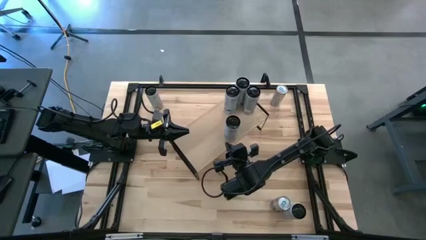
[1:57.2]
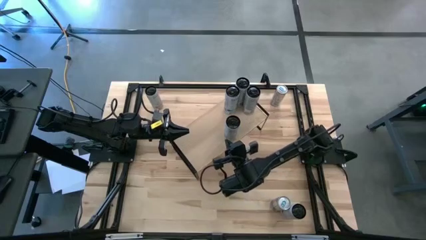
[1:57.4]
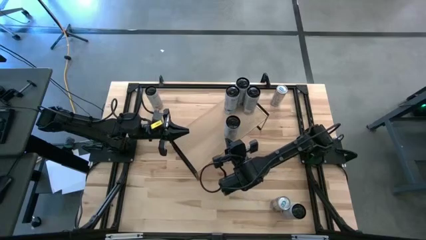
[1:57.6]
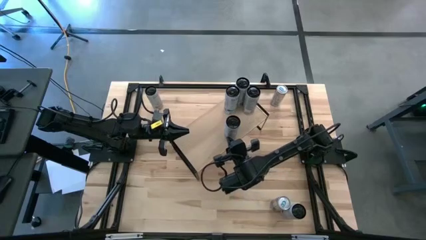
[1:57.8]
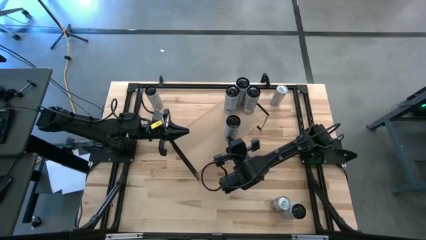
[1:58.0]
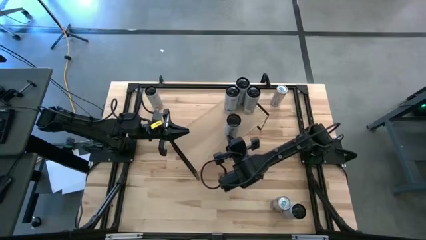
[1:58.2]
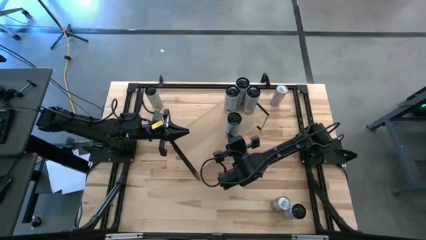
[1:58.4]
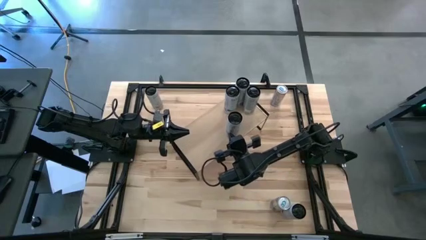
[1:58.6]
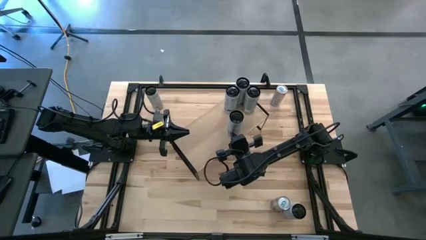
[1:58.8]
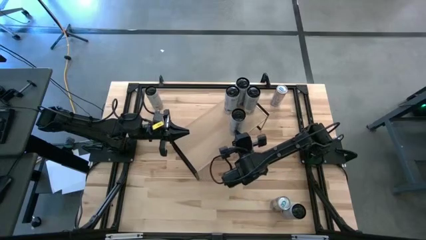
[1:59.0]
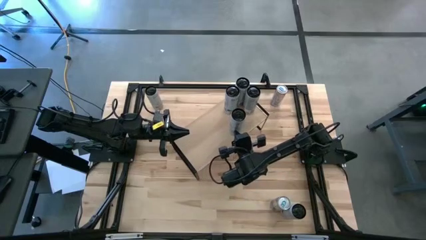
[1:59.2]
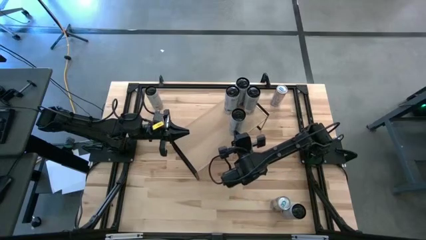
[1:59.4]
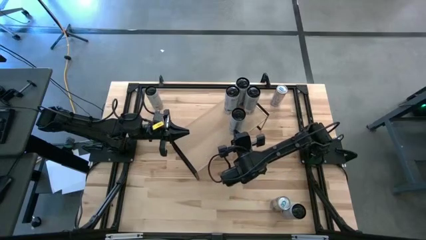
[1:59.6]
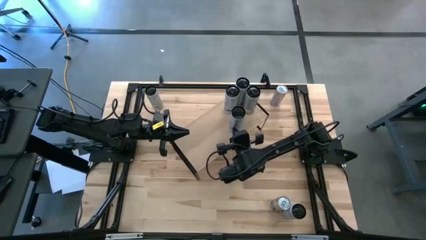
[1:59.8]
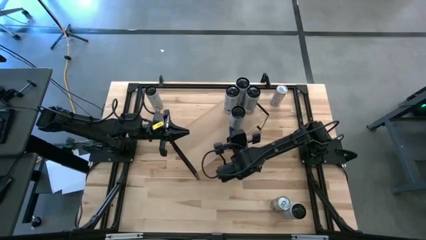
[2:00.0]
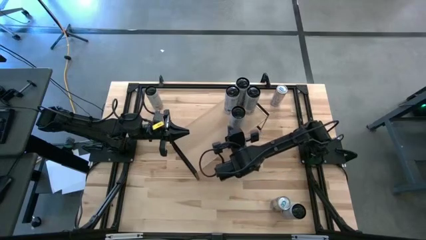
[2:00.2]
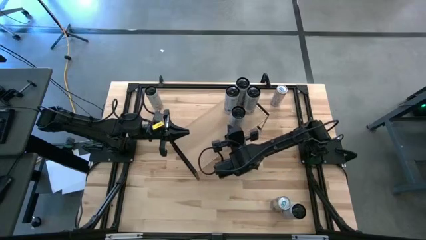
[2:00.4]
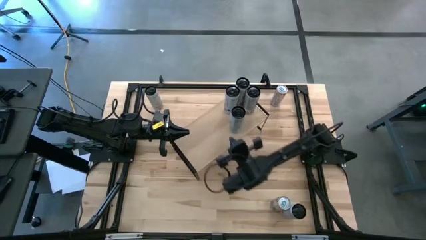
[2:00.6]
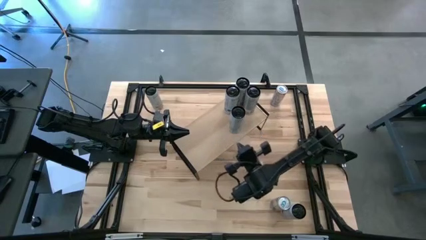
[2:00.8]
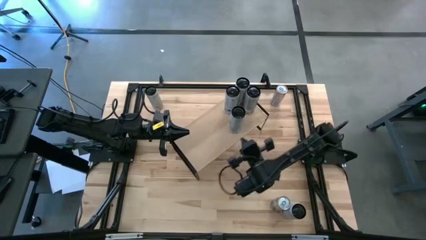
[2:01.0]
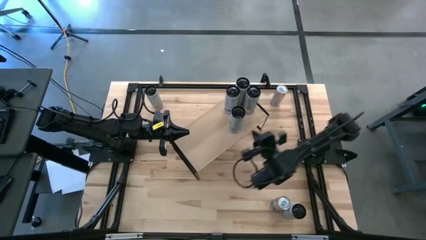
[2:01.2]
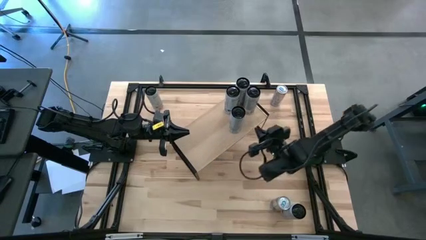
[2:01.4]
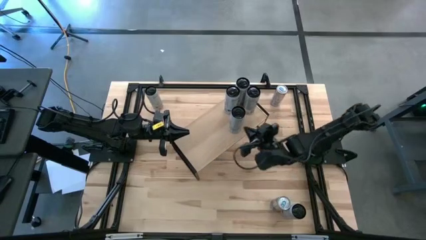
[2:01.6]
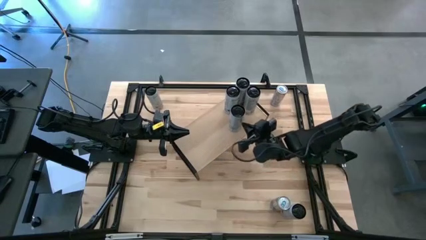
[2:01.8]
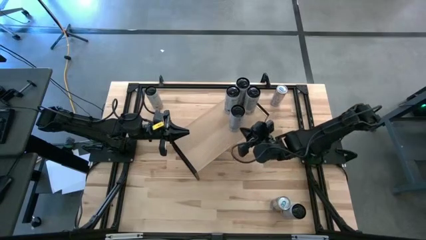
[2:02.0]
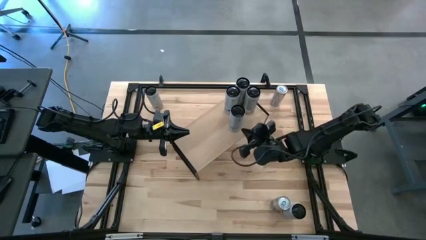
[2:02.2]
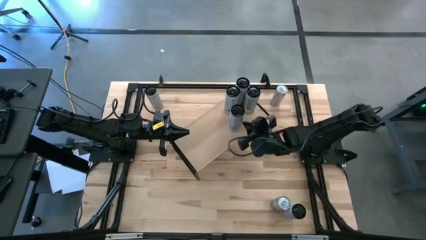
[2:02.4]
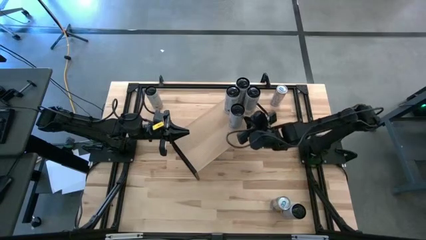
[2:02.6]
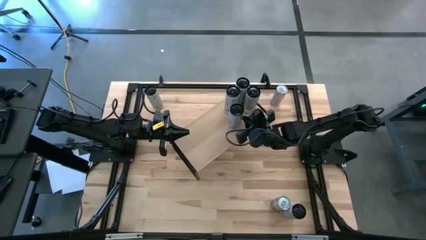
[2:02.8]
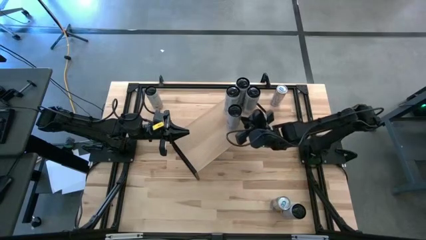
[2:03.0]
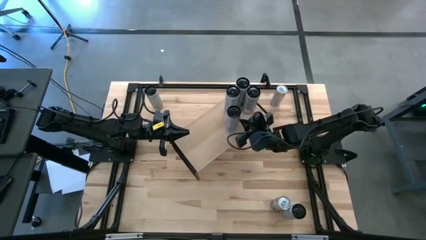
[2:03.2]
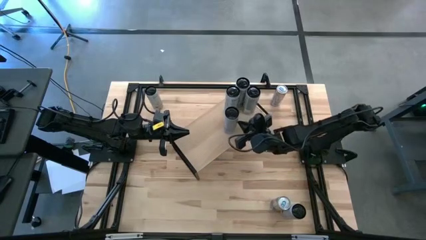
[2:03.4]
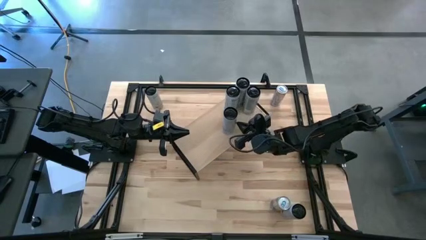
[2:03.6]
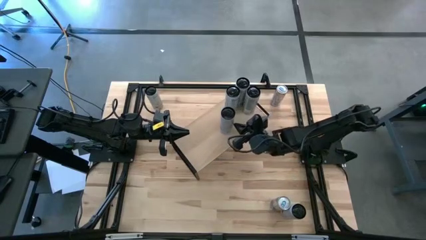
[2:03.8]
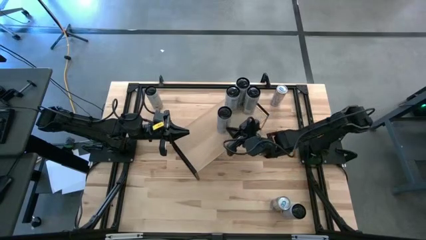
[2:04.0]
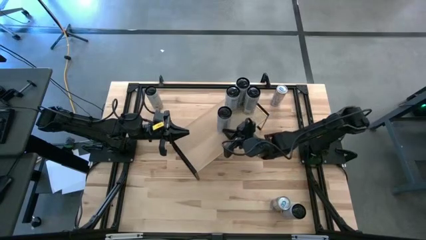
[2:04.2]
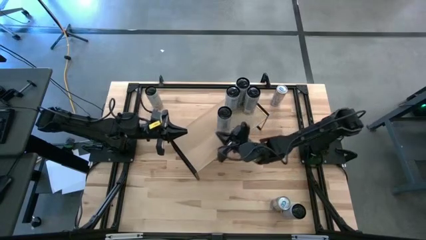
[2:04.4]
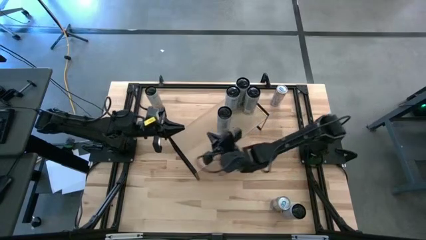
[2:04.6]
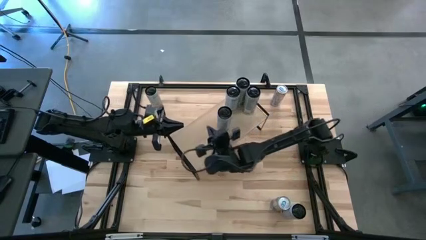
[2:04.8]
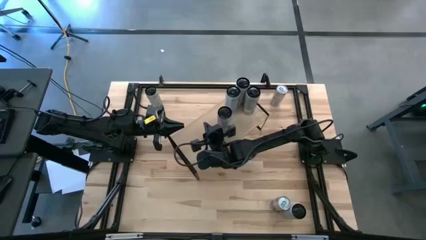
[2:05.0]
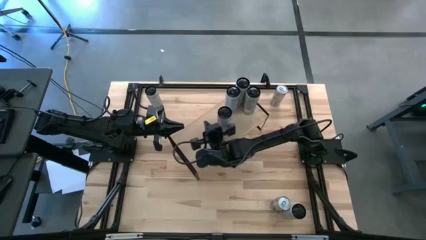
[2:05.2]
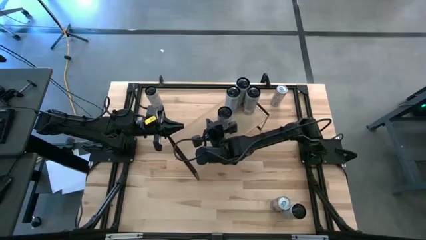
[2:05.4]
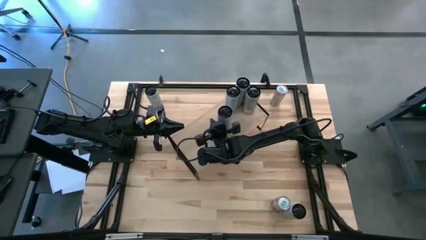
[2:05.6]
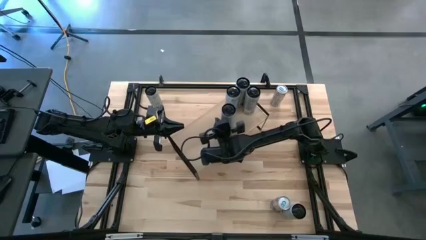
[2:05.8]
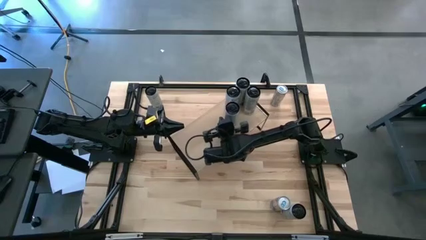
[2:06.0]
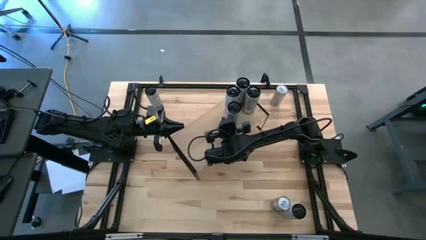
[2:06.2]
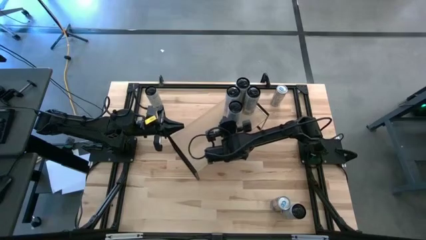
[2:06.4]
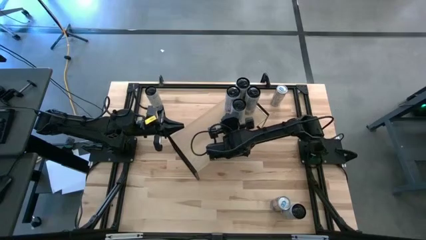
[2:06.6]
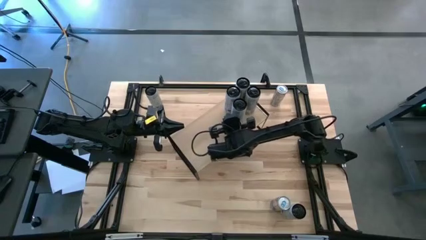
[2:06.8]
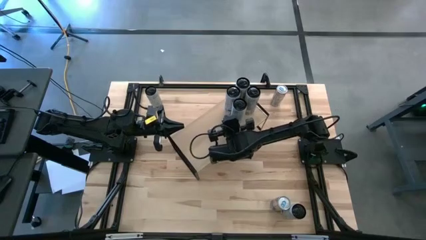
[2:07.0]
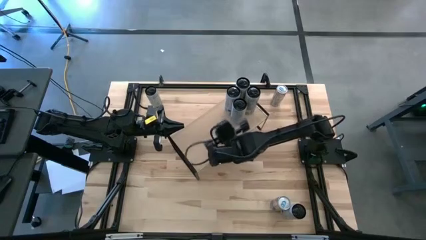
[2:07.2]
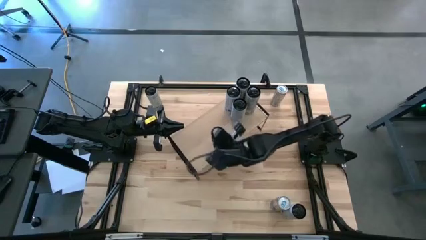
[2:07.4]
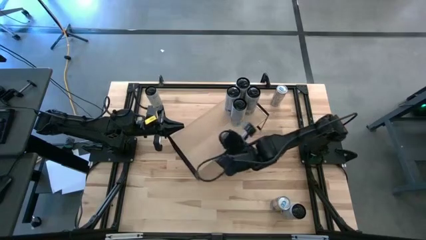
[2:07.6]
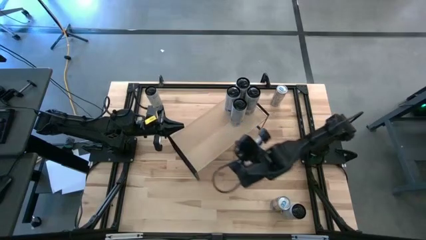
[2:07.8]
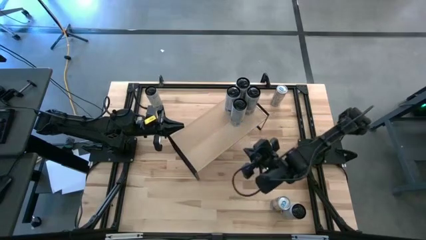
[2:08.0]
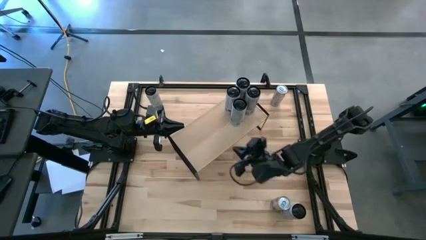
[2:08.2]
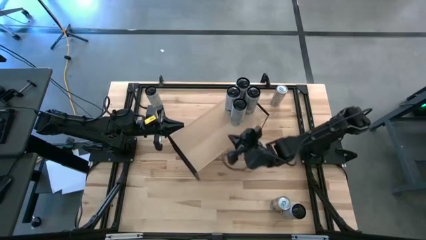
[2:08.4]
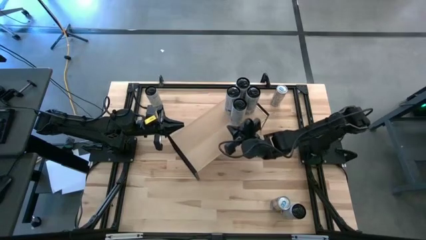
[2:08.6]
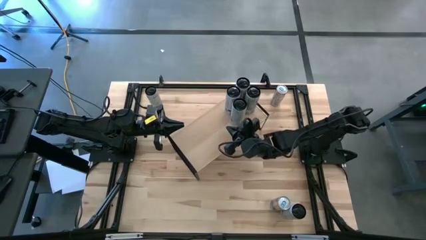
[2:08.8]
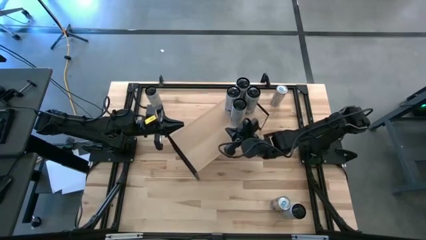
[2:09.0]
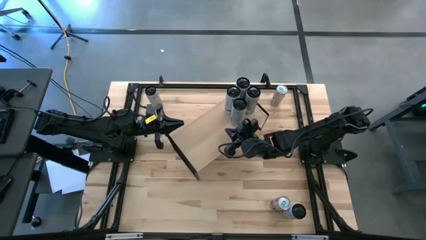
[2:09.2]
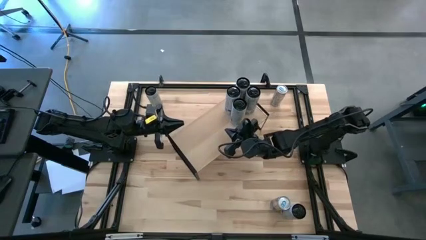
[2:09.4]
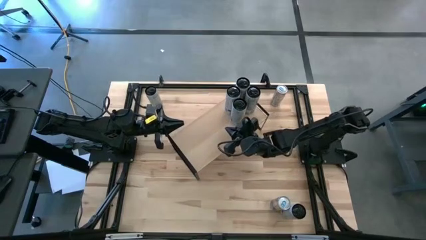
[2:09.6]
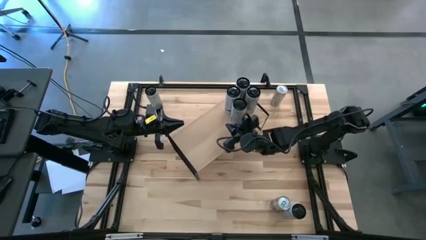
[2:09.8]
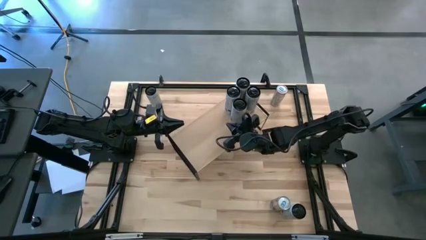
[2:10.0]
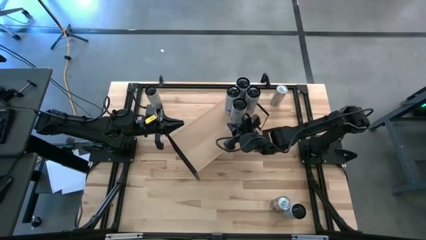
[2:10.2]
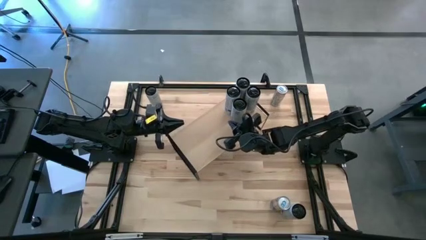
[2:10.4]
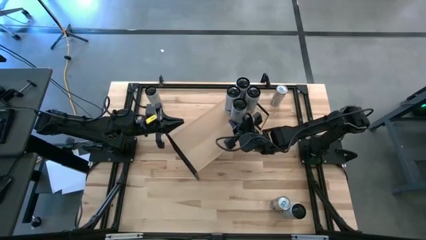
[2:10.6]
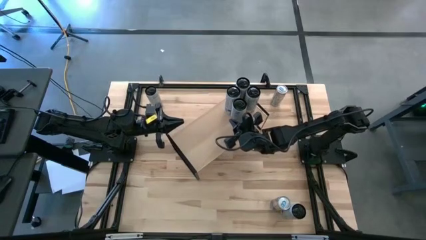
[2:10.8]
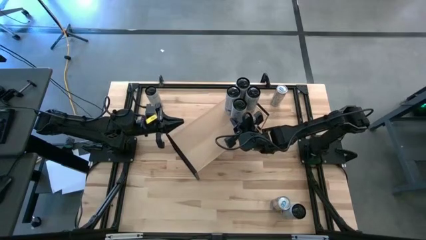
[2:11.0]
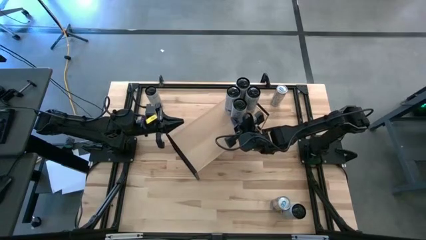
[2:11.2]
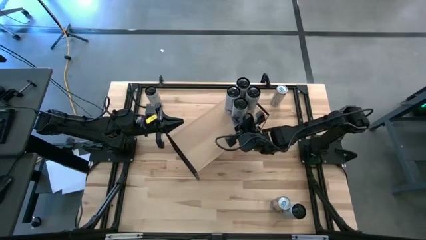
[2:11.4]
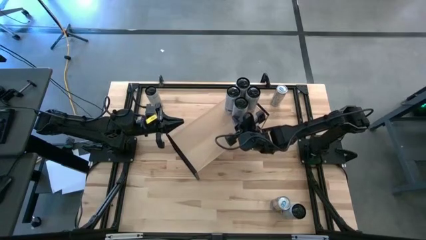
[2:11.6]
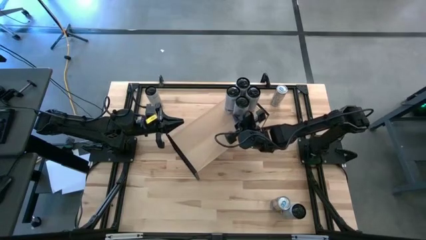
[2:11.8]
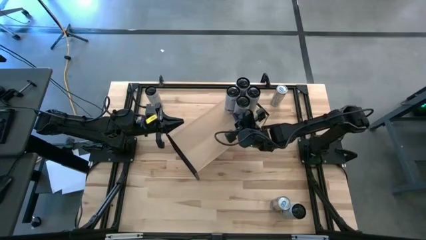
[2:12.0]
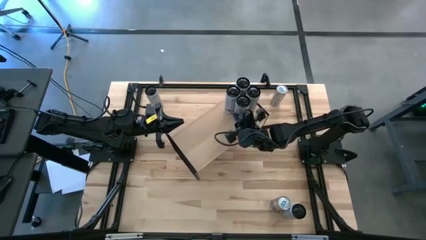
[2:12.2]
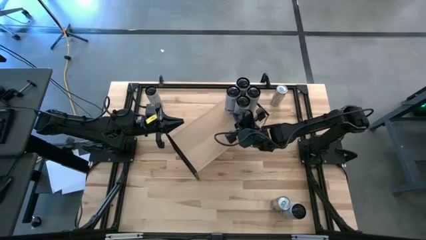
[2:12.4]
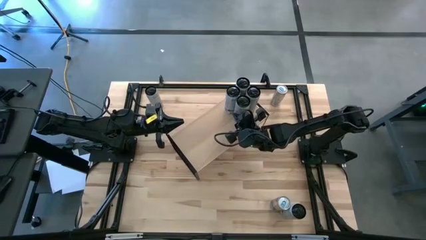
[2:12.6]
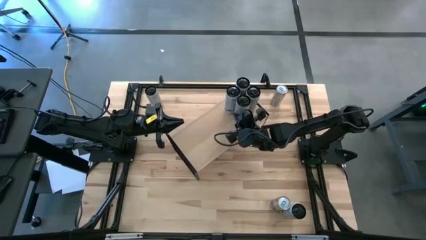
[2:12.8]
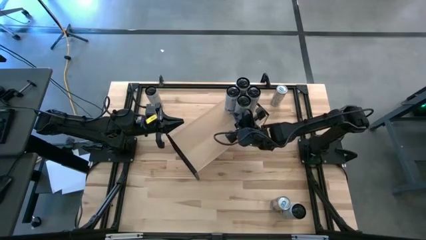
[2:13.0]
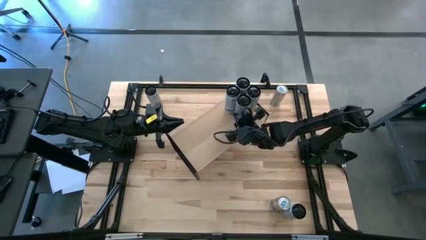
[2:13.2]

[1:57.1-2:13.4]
Task: Place canned beverage on shelf
Put the white-blue soda can on the shelf and align it with the other white-blue soda can
